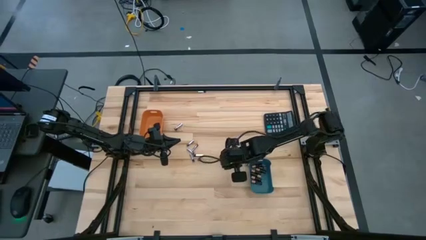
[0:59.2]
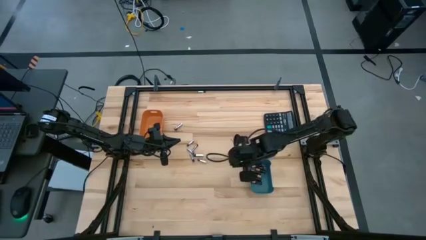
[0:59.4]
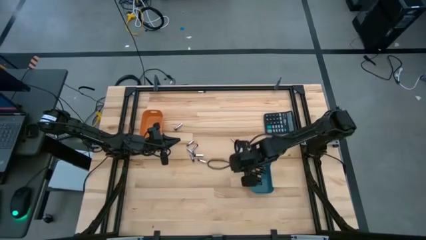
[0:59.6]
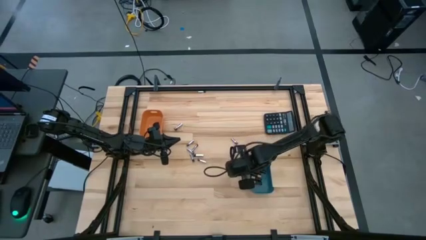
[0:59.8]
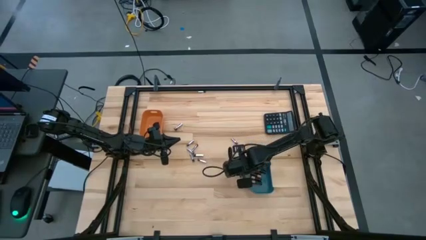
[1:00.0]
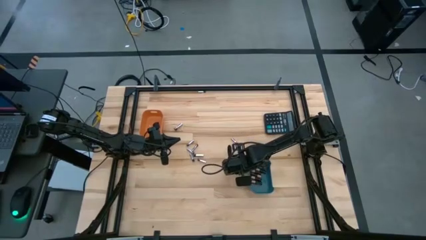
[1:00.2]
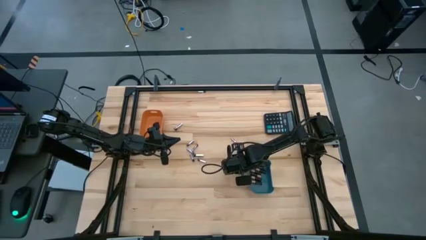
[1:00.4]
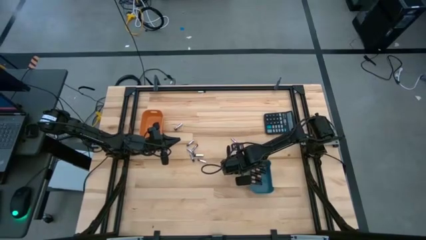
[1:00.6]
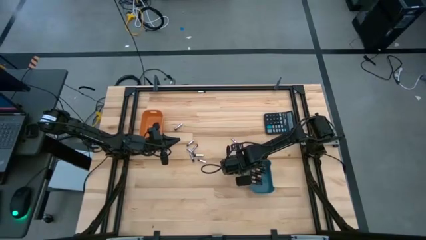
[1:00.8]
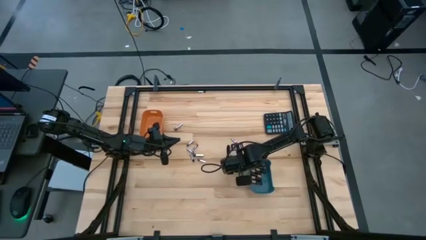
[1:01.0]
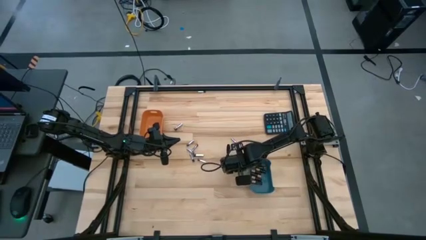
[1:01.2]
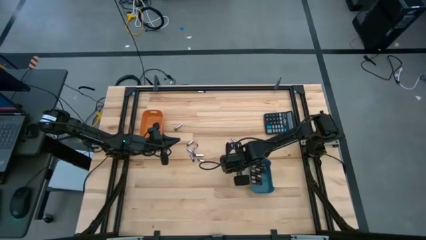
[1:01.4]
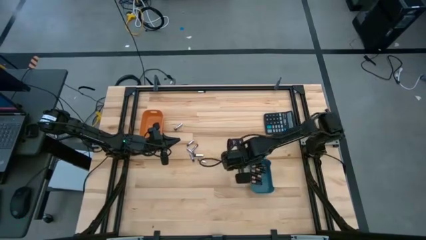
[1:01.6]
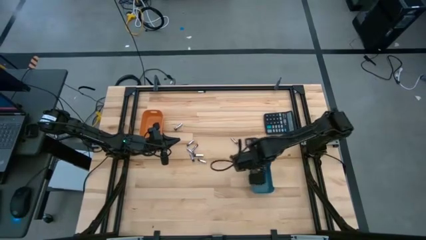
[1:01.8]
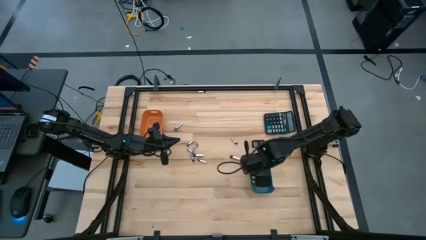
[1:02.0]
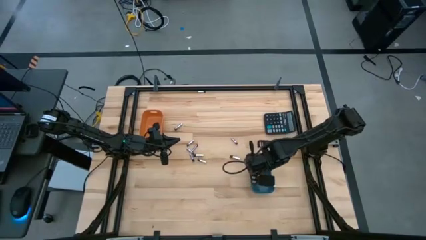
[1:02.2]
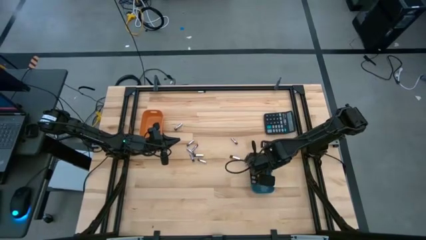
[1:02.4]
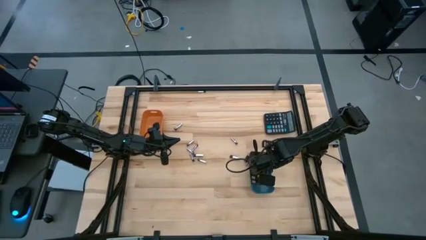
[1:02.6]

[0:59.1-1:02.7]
Task: Sort batteries
Put the black battery into the blue bin

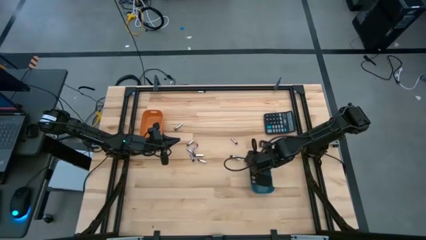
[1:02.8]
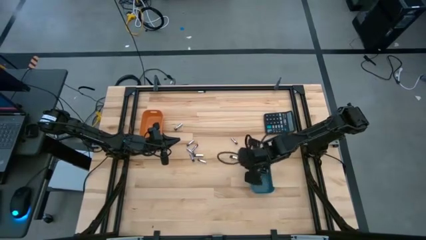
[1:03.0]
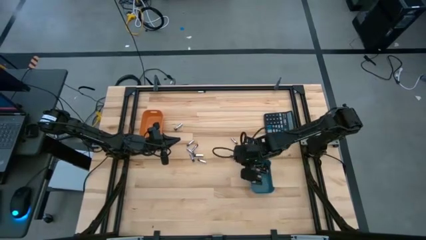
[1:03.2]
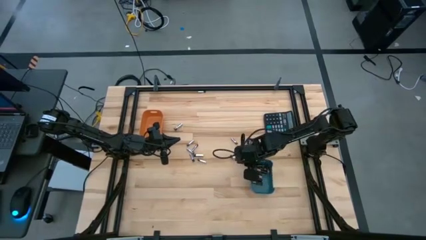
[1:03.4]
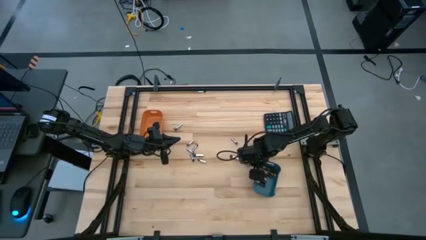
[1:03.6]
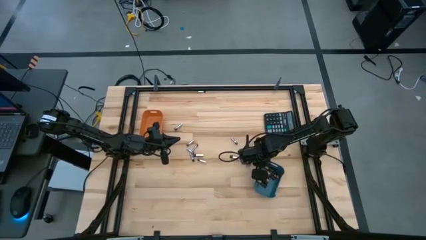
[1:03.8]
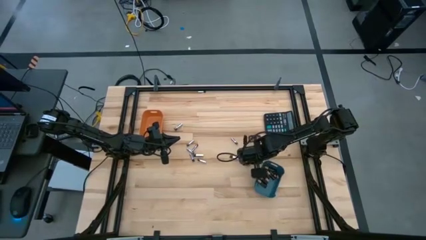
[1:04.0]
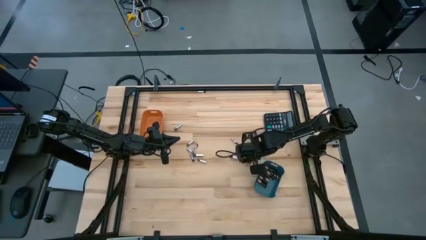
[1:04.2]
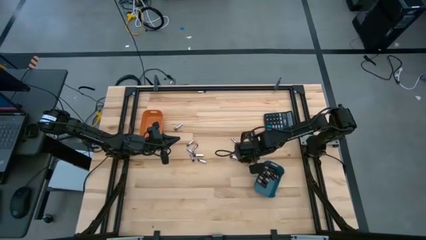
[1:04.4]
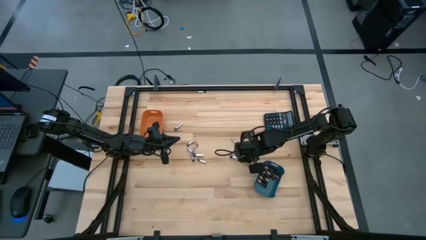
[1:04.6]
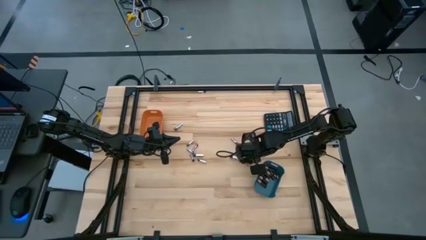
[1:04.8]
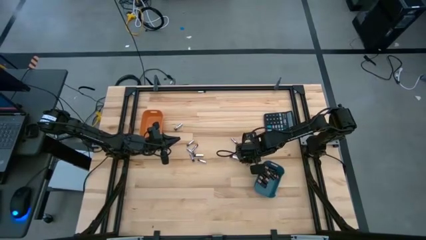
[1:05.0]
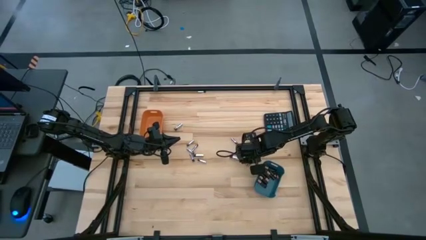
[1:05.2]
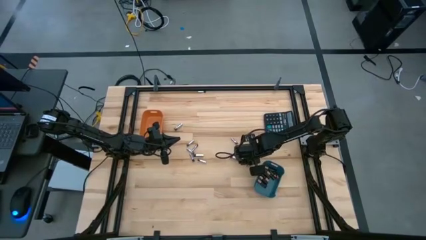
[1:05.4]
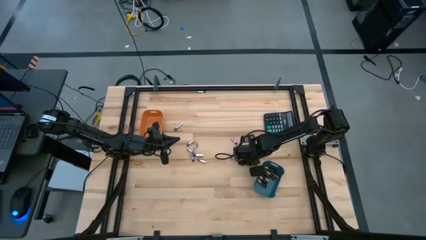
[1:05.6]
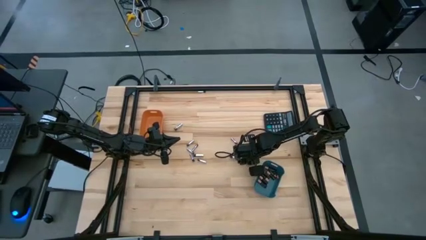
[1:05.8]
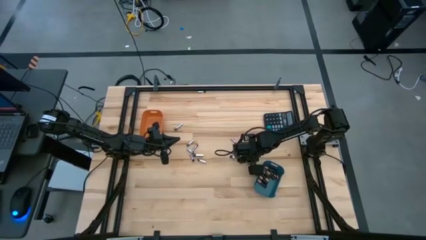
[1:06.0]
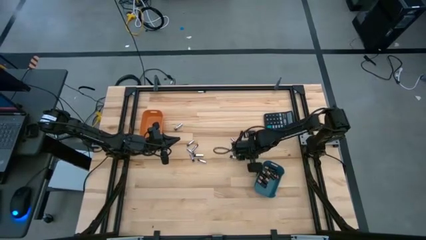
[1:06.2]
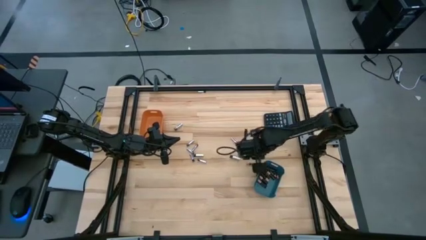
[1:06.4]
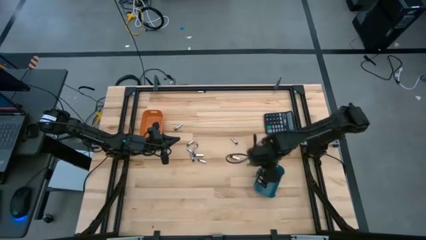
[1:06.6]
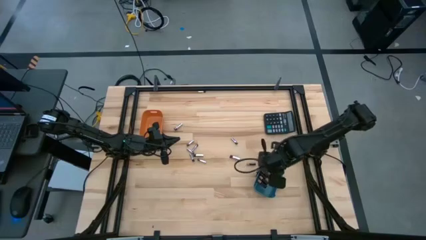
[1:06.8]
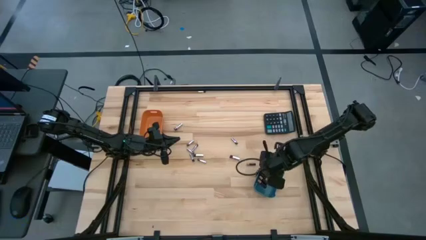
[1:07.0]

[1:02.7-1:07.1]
Put the black battery into the blue bin

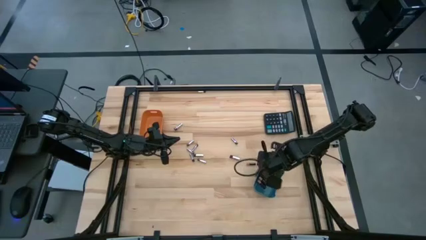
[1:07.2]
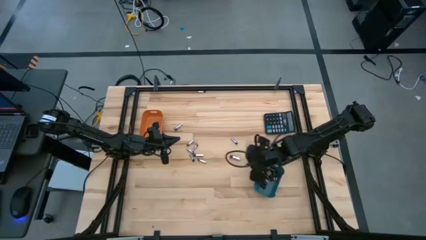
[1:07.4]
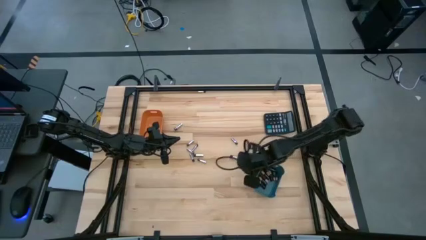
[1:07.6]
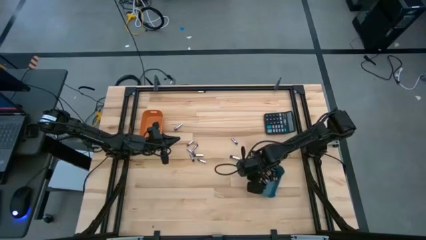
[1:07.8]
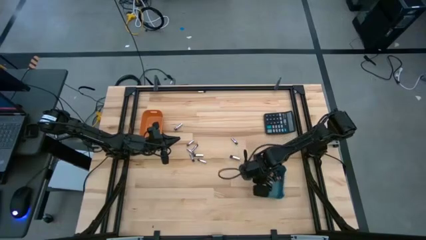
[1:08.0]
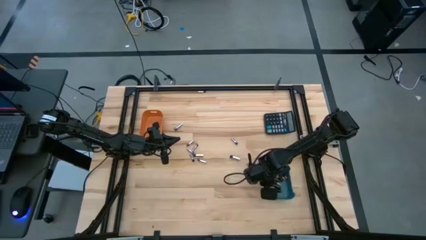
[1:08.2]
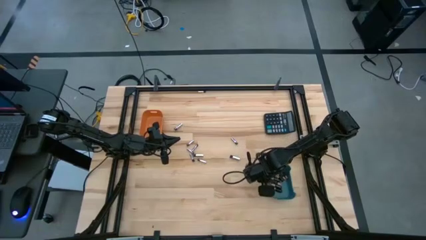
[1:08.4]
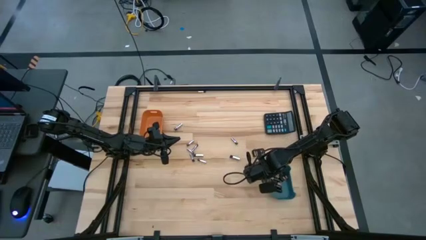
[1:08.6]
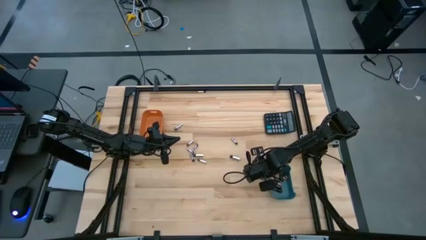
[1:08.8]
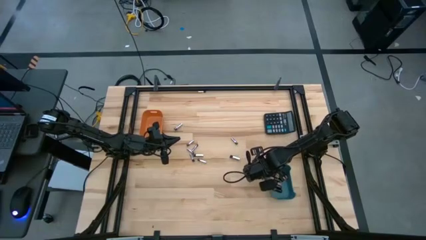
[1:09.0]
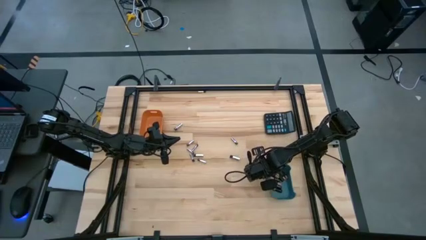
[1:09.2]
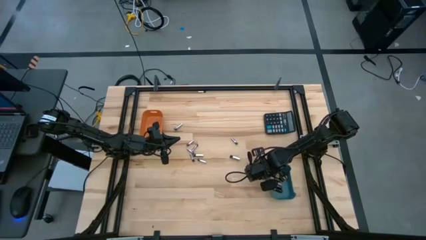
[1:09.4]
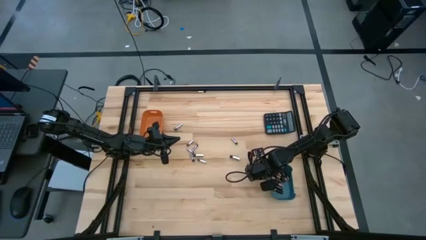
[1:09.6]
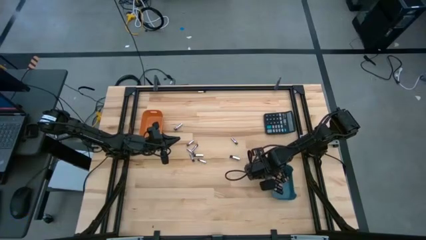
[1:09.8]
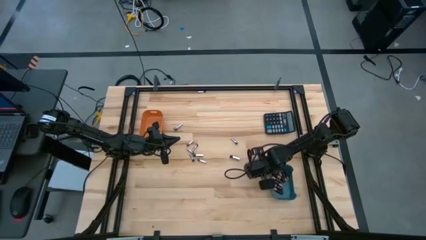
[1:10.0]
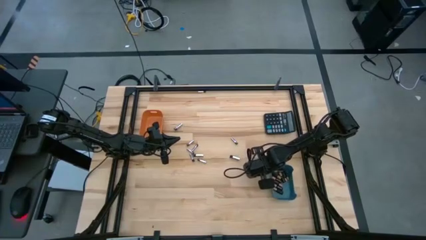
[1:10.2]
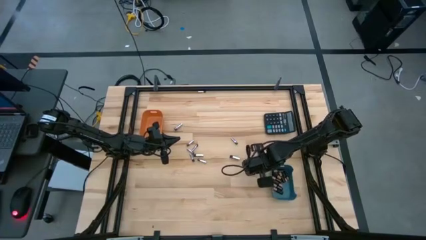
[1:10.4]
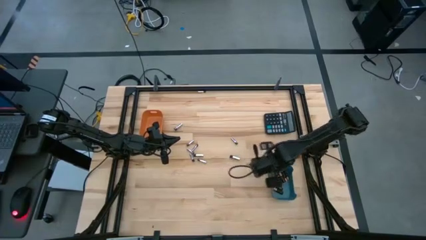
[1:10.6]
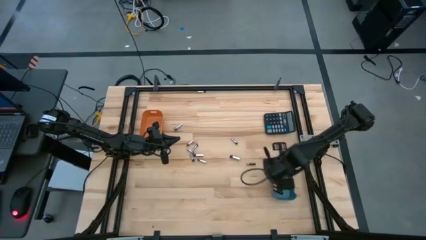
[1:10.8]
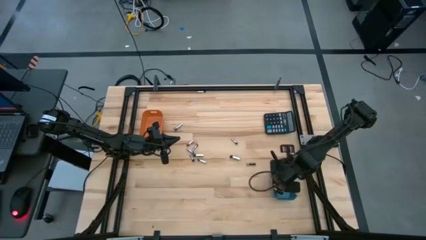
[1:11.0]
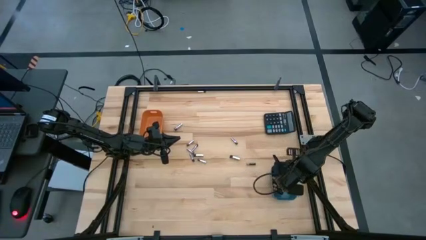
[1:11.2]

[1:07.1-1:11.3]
Put the black battery into the blue bin

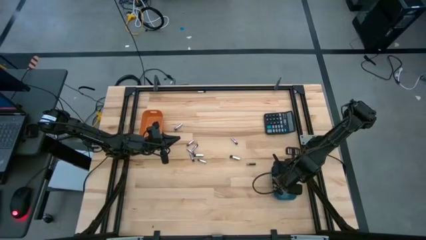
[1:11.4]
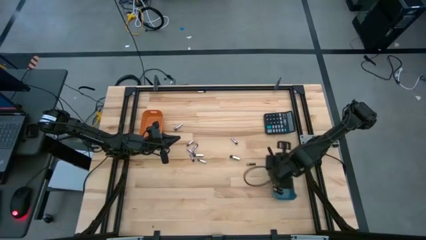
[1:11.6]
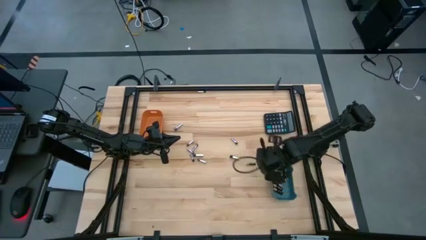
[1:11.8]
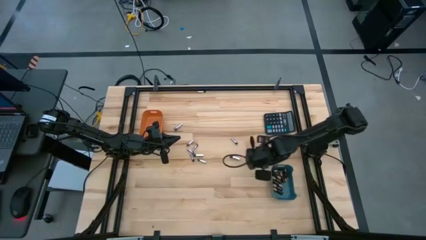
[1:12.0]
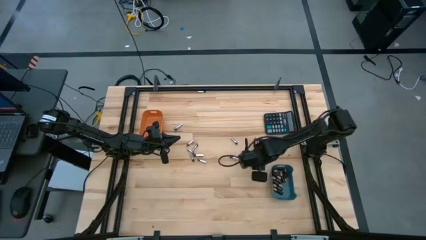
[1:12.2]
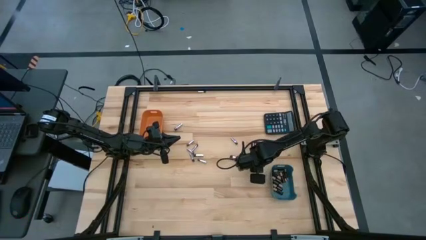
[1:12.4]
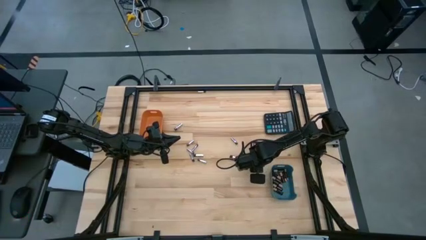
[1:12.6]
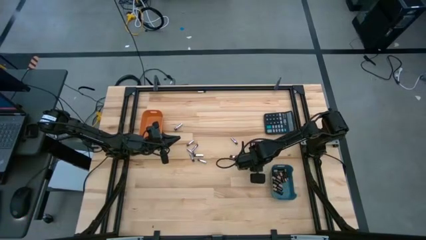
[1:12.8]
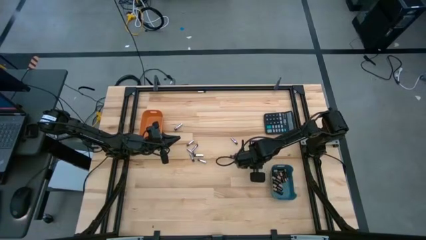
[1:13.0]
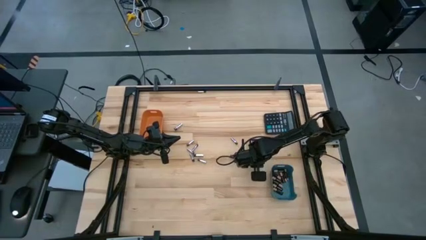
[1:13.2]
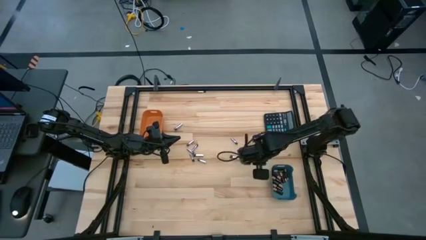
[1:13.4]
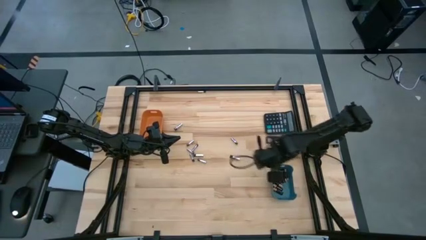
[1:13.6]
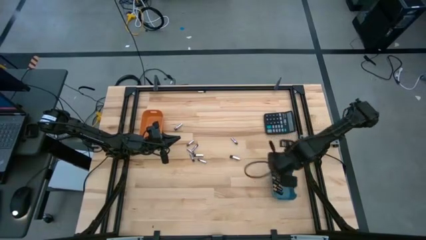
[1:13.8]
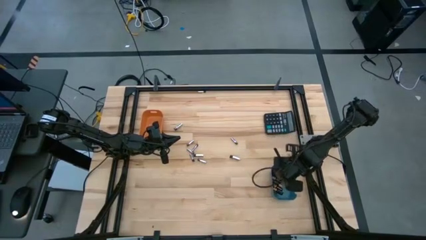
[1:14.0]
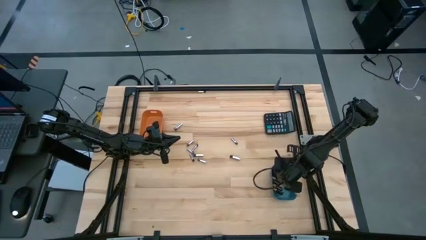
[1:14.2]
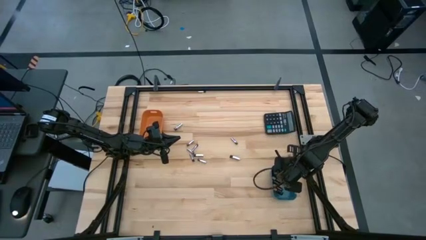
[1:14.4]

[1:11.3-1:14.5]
Put the black battery into the blue bin

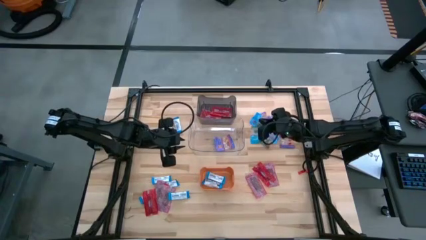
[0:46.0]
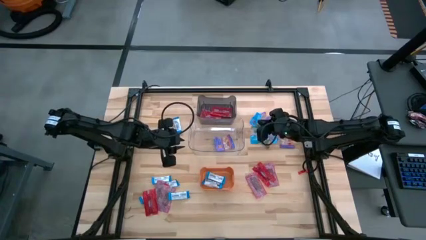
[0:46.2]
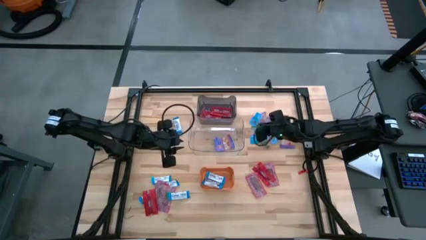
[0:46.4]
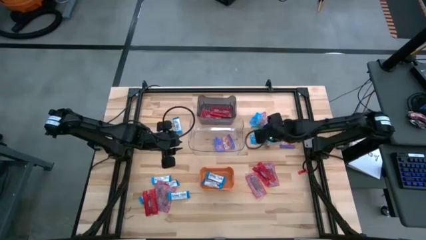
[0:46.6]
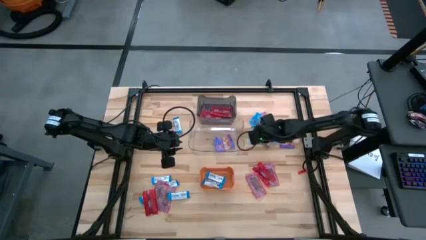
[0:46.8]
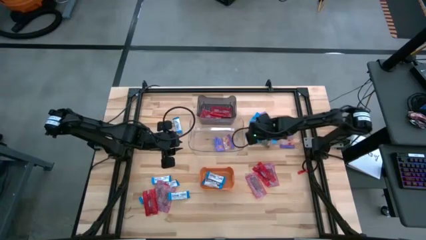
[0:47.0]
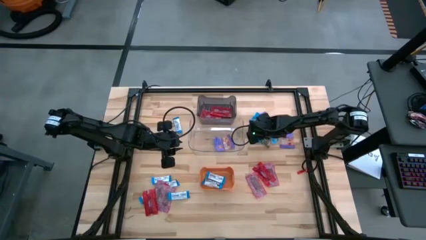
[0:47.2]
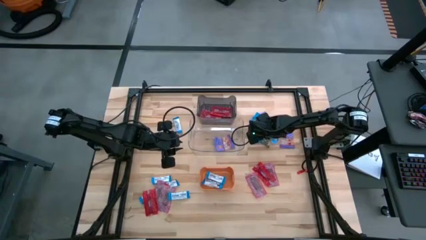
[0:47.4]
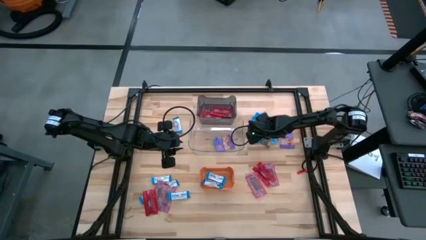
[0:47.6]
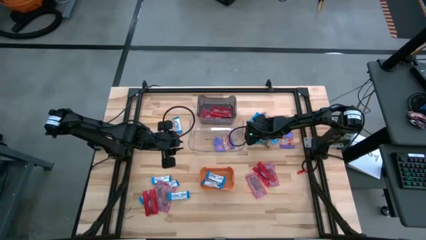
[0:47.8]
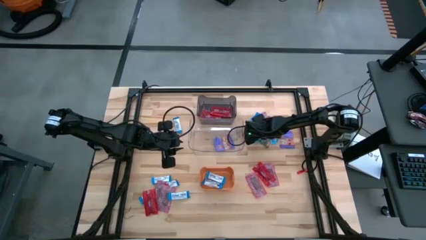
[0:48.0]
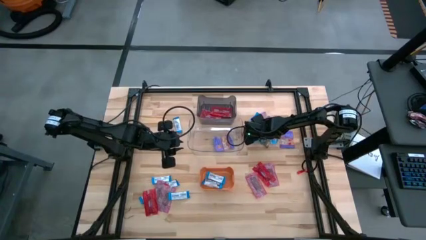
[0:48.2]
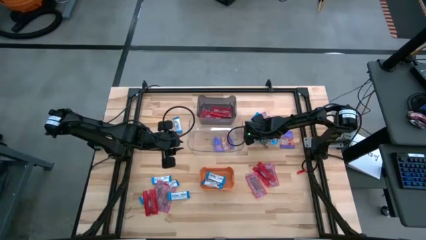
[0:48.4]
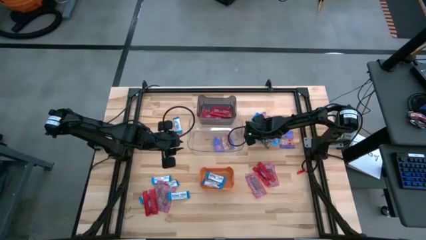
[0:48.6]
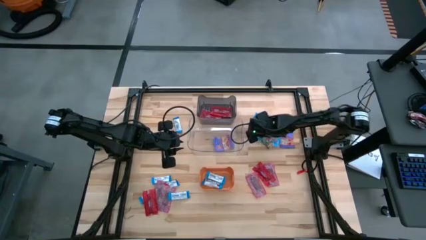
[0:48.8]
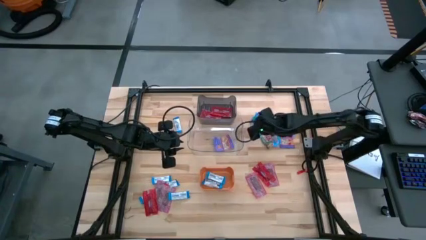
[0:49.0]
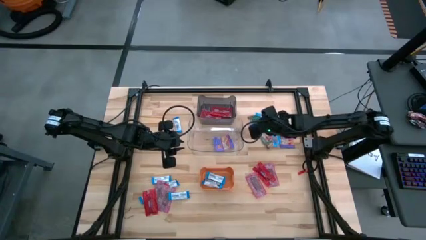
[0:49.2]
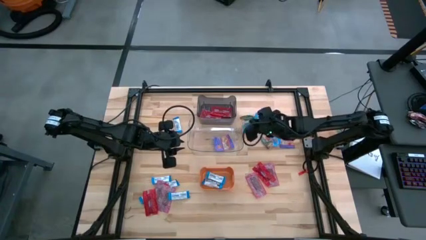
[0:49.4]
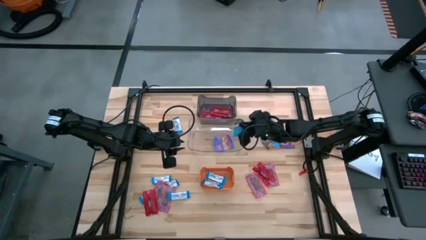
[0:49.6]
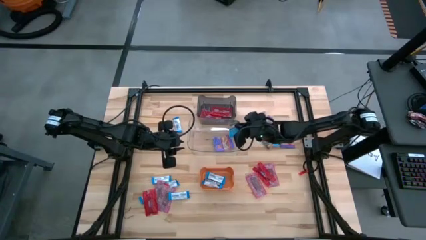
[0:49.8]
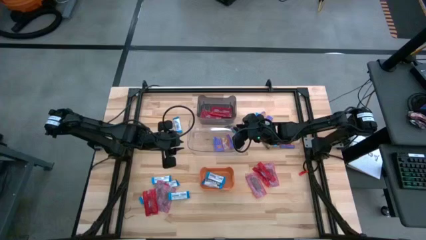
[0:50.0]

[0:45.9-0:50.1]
Task: Sort candy
Put the blue candy into the clear transparent bin
